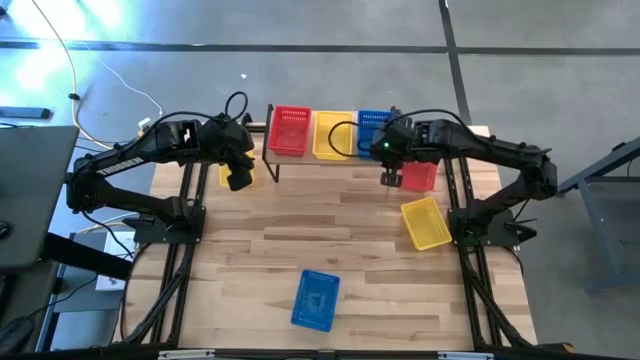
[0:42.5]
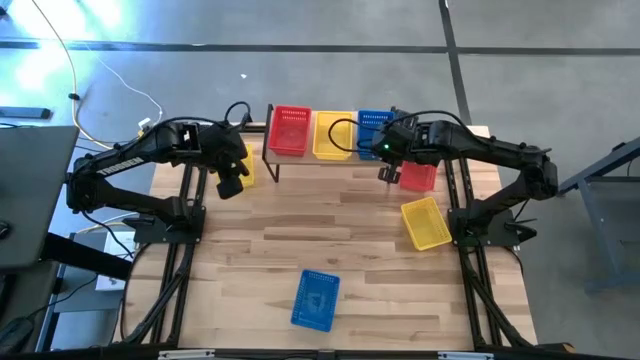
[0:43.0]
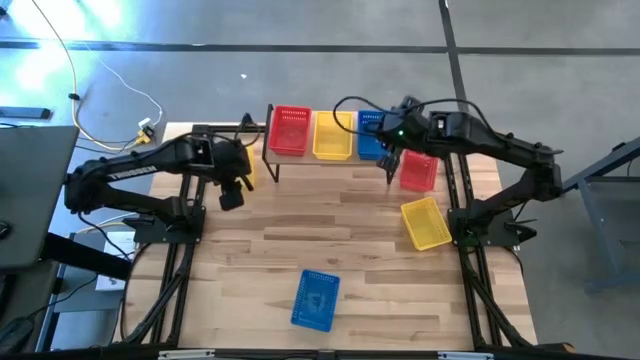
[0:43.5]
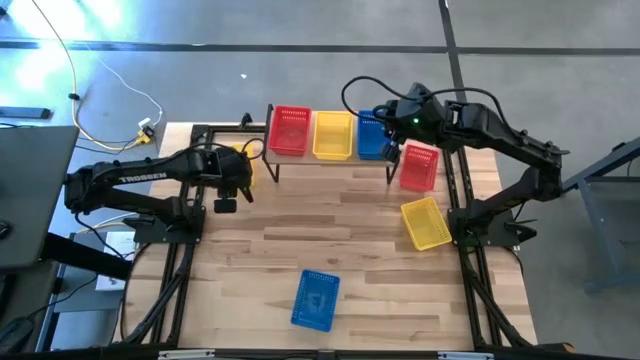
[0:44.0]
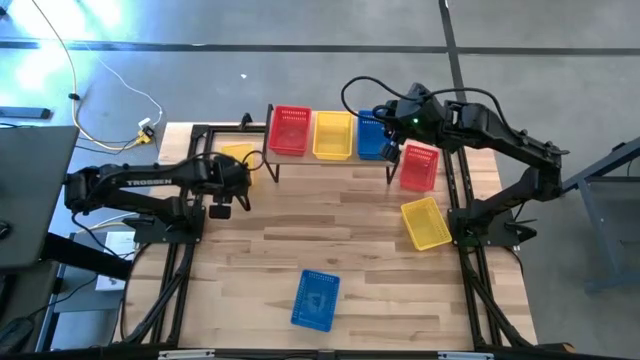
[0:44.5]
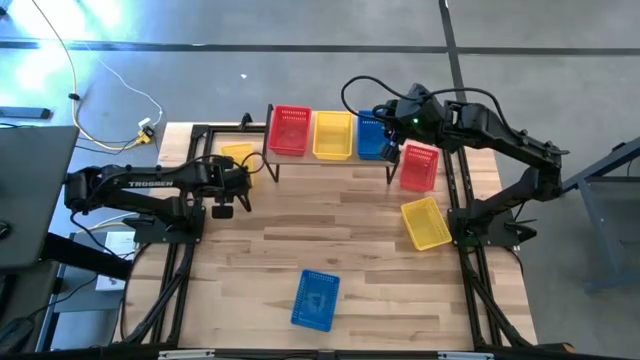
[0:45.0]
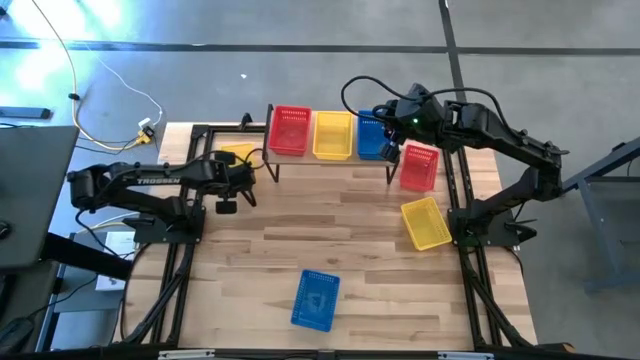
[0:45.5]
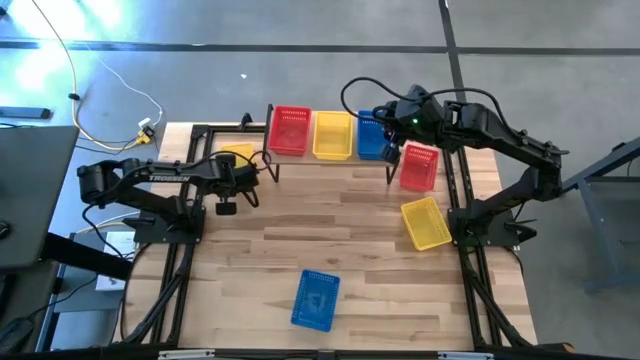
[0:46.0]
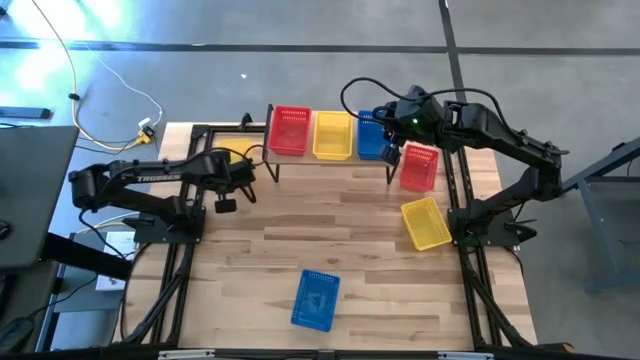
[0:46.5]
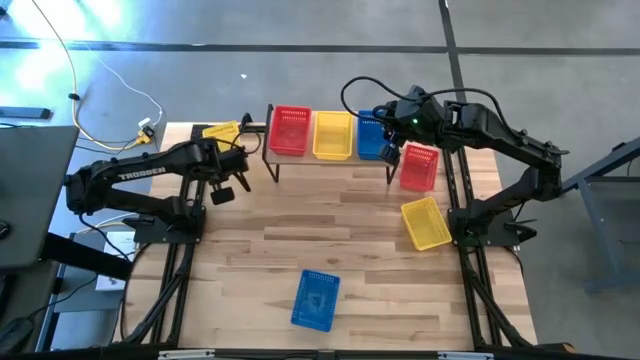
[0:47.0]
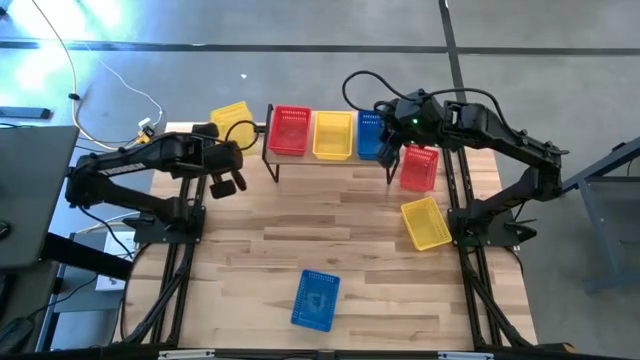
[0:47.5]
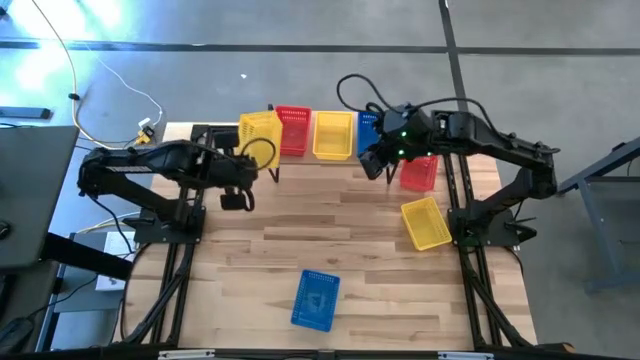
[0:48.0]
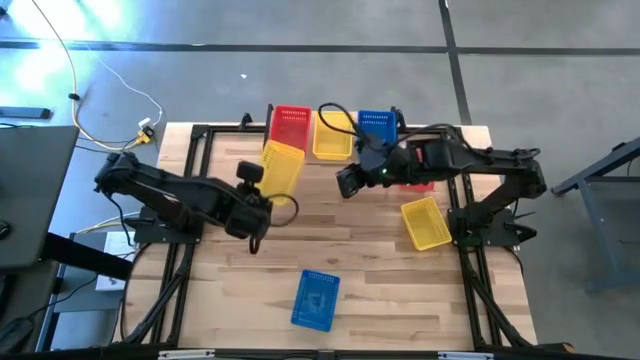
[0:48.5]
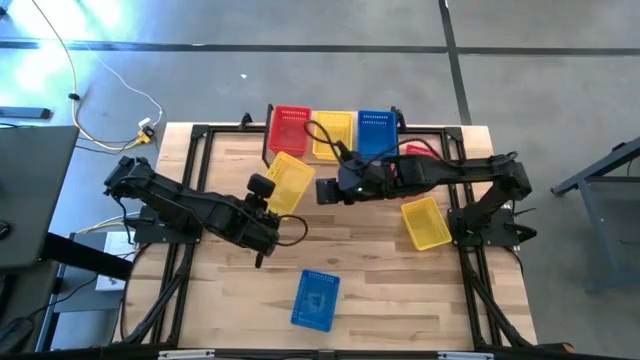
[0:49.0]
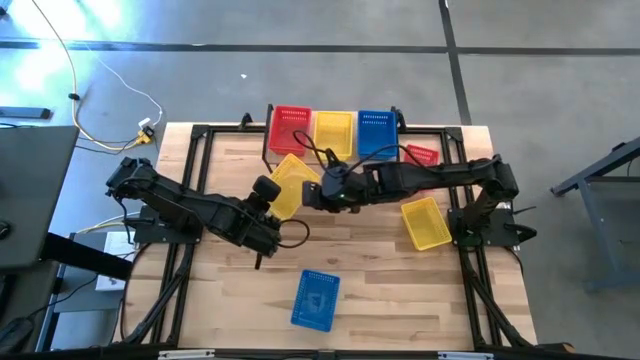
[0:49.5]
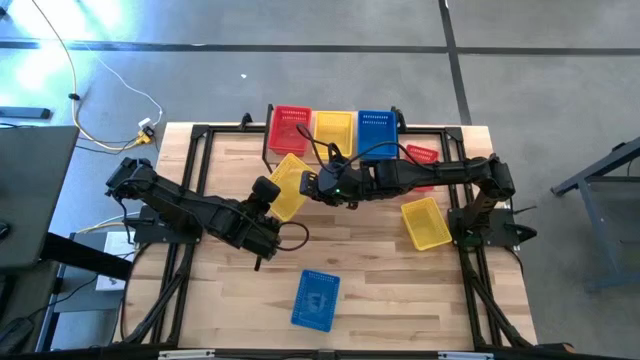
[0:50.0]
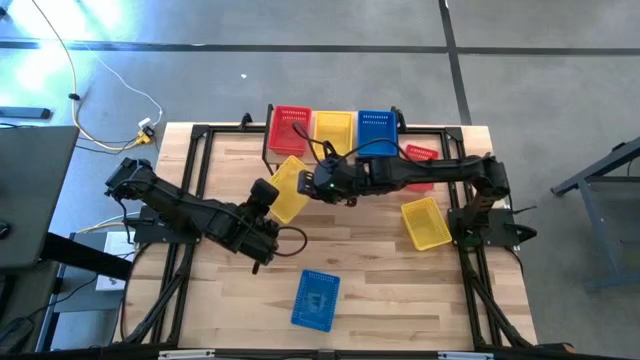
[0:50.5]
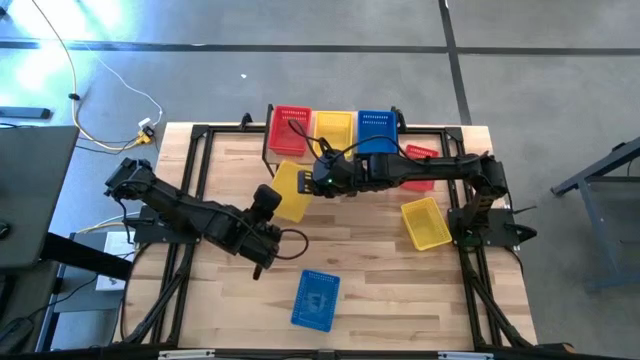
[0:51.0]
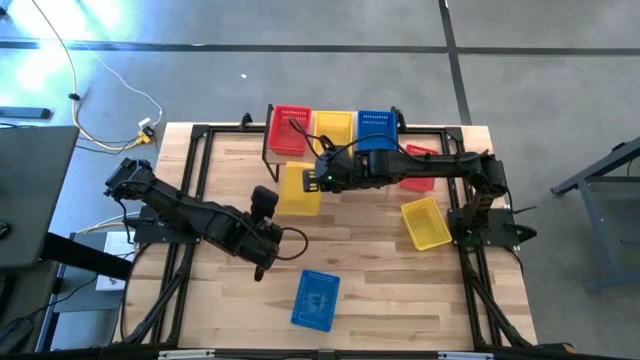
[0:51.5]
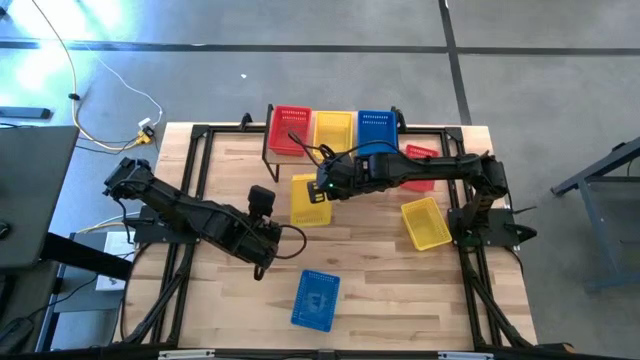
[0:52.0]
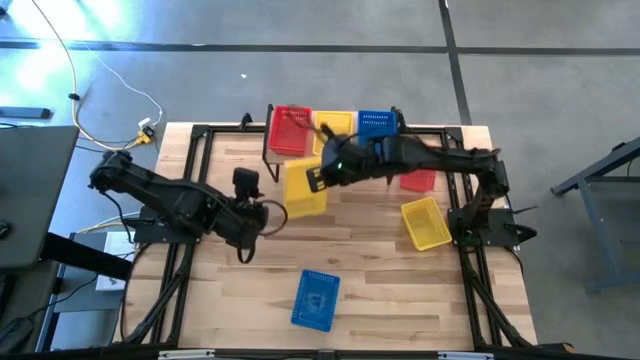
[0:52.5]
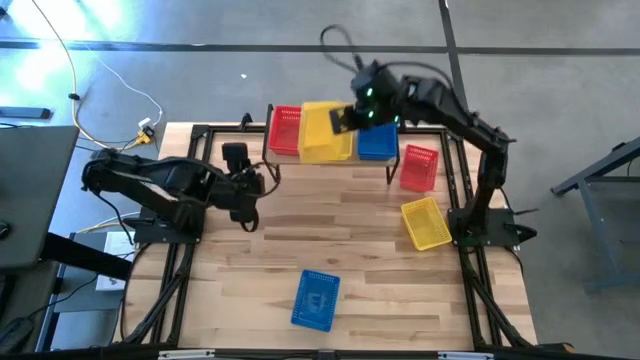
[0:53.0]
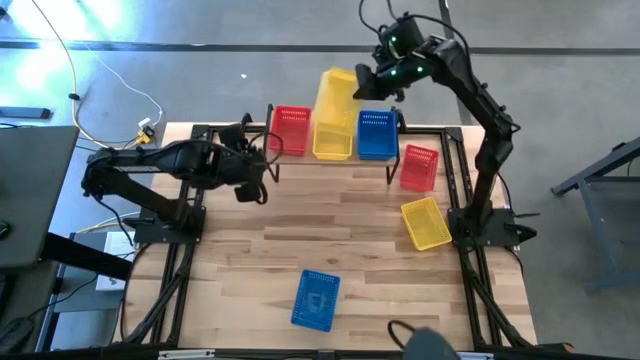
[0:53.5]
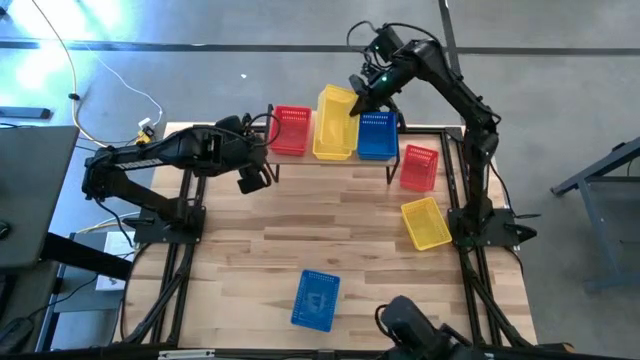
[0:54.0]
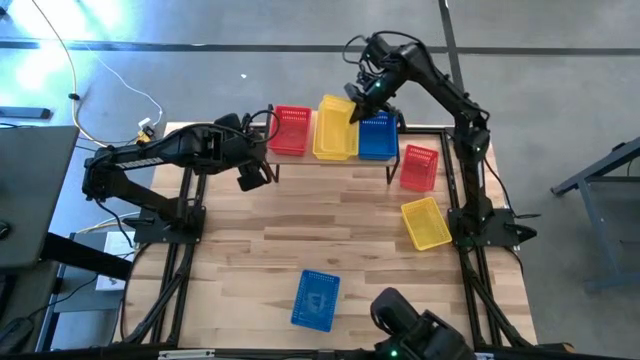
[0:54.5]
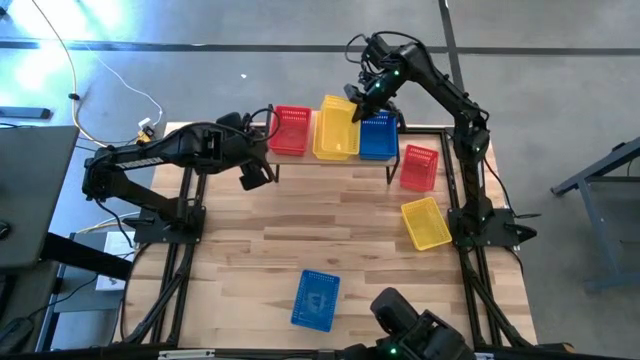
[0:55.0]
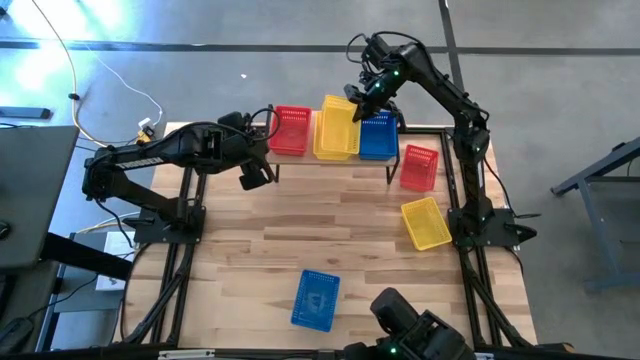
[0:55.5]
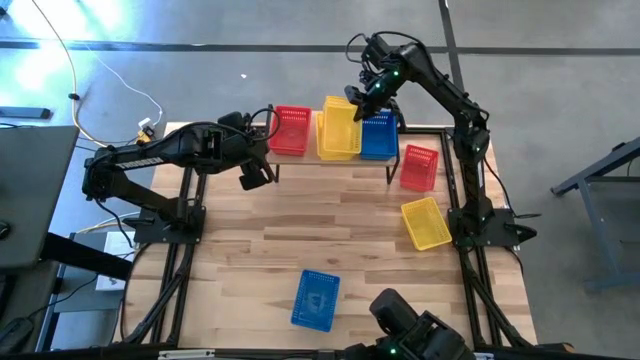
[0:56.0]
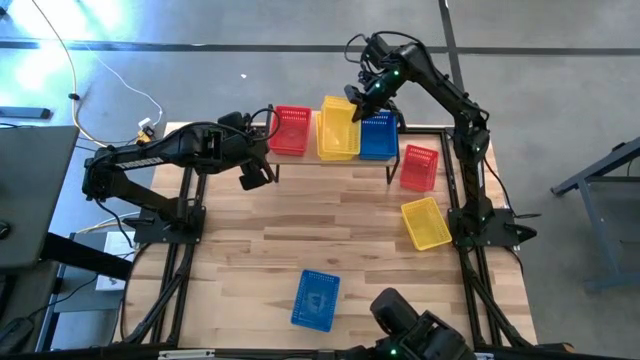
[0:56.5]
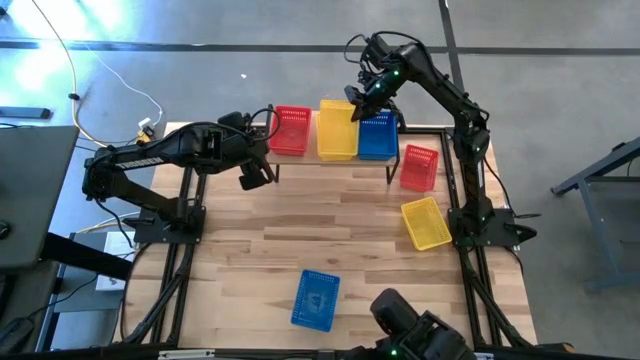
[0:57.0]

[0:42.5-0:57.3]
Task: Stack baskets on shelf by color
Stack the left yellow basket on top of the yellow basket on the shelf

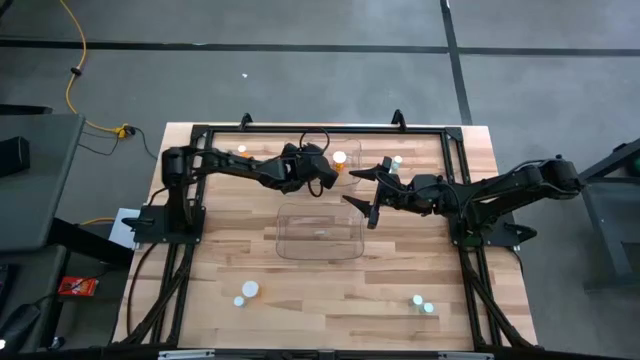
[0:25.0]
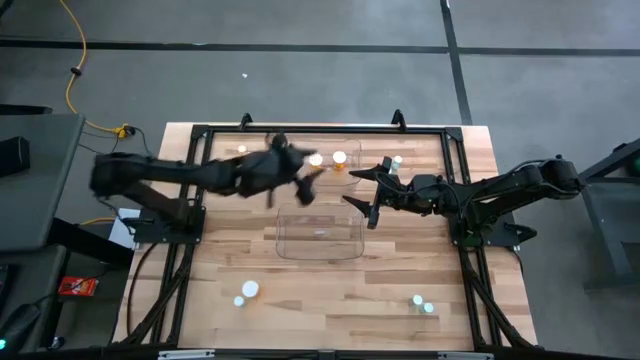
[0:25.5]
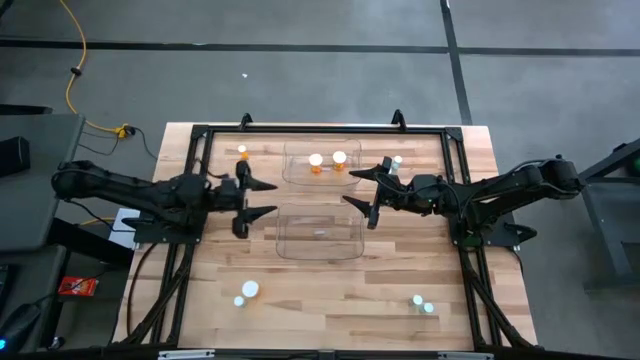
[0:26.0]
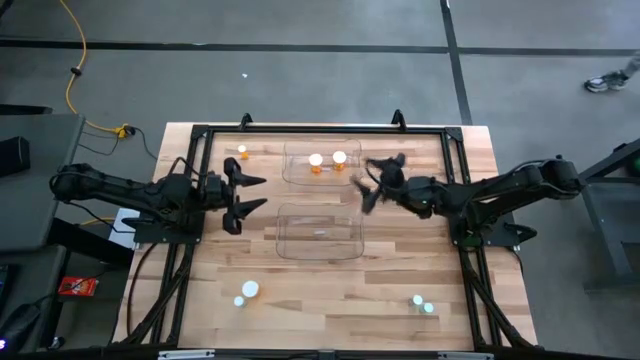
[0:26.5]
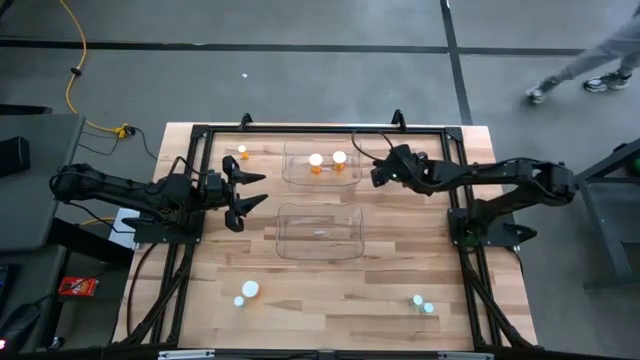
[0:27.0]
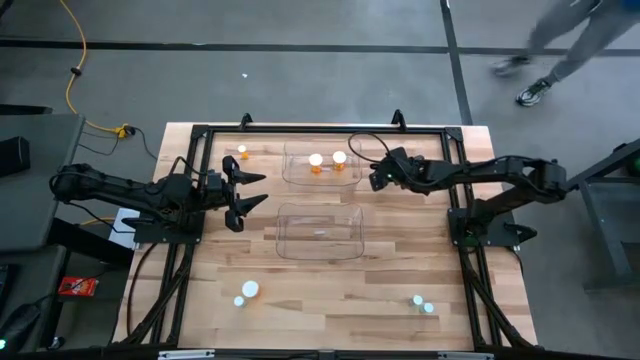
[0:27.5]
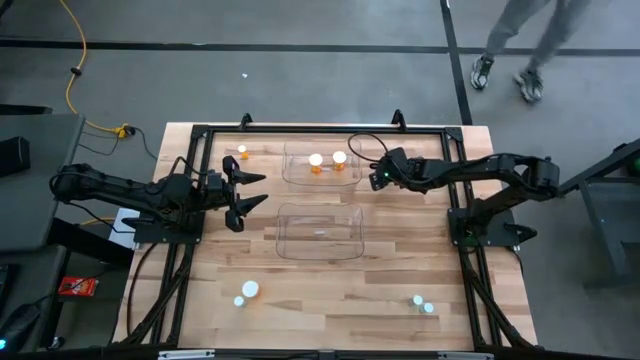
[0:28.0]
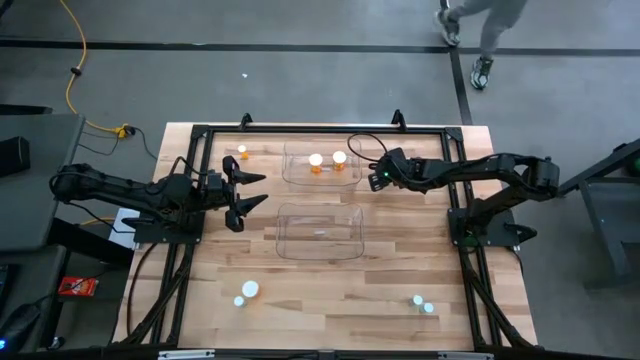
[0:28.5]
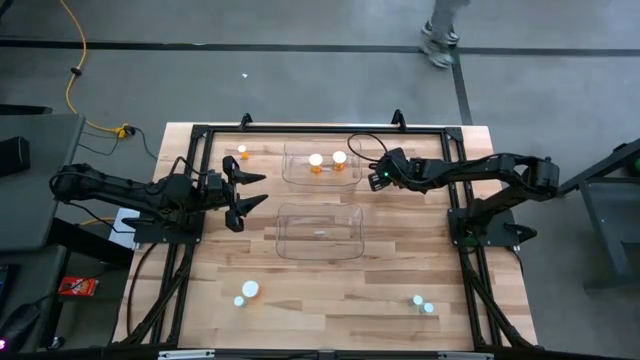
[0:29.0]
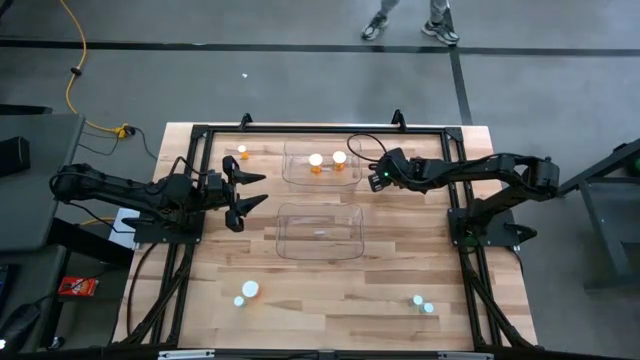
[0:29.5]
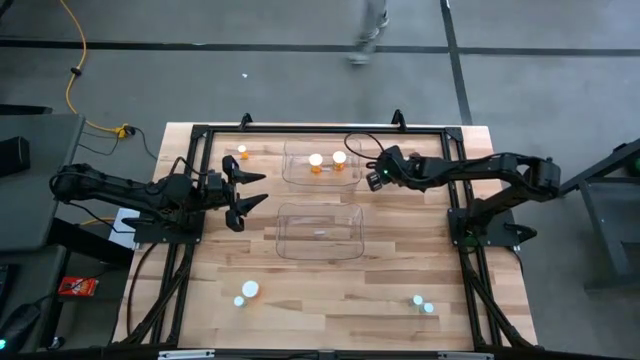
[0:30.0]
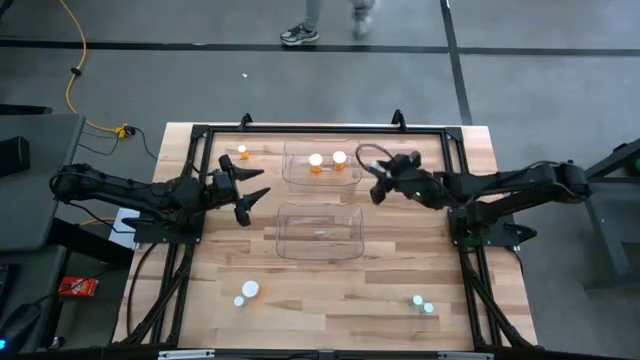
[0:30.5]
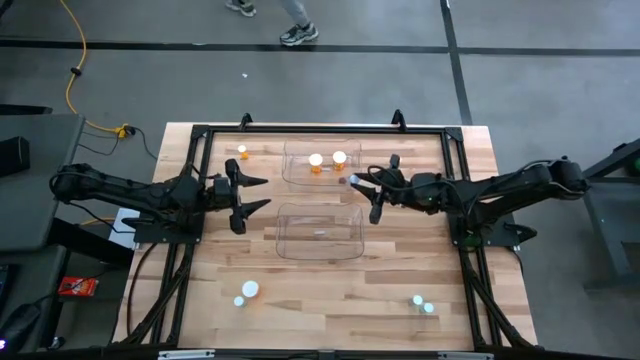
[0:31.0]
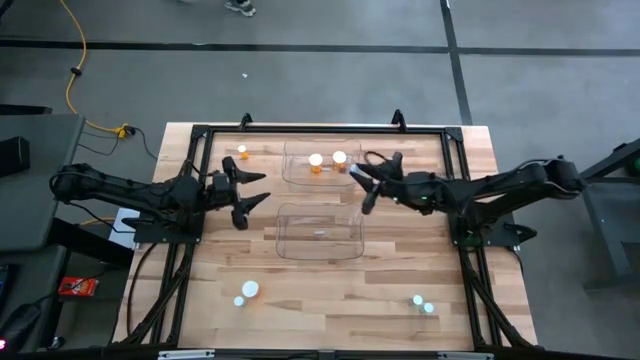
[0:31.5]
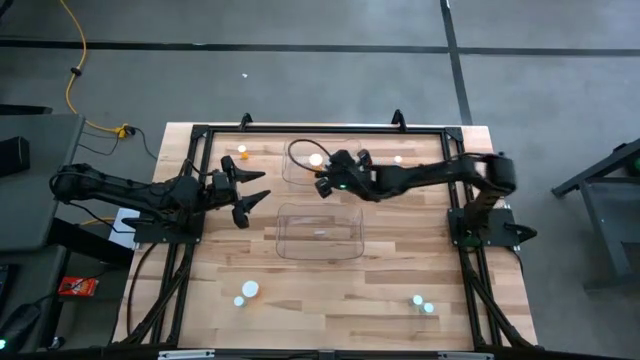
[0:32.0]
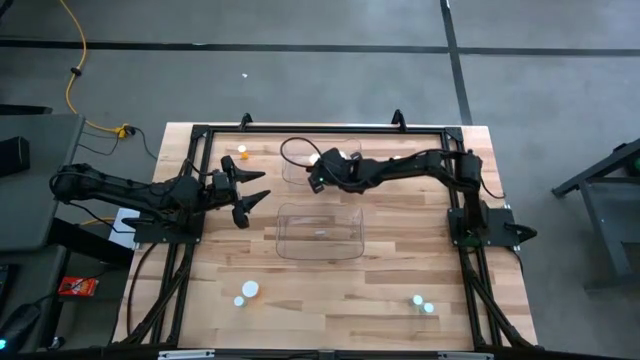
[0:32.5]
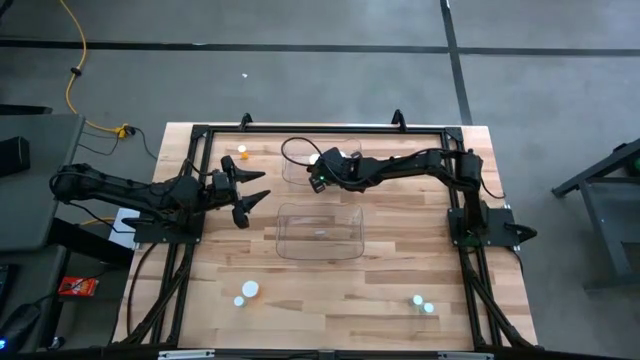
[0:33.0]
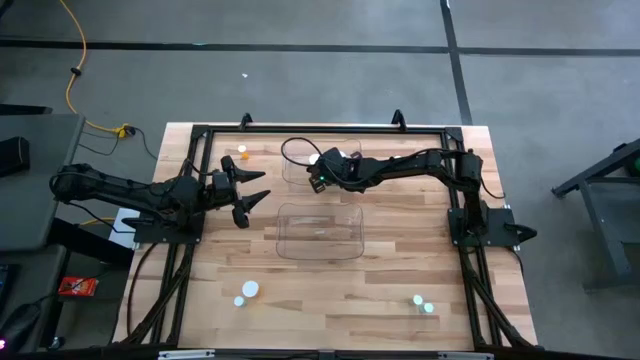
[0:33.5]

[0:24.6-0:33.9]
Task: Pick and place medicine bottles into bin by pill shape (circle, oval)
Put the blue capsule bottle into the top transparent bin
